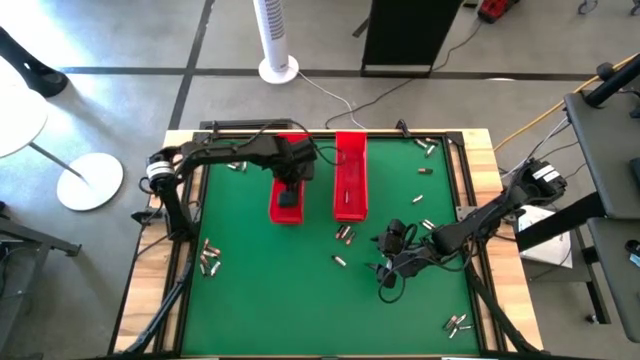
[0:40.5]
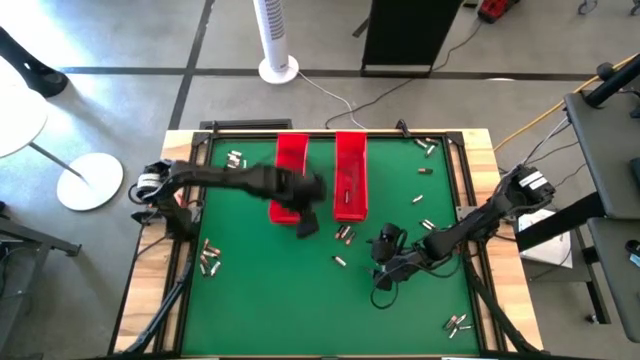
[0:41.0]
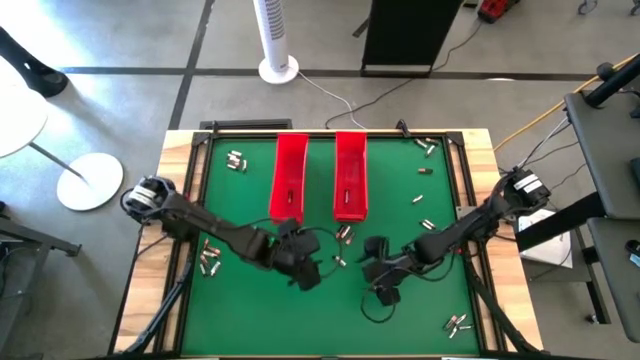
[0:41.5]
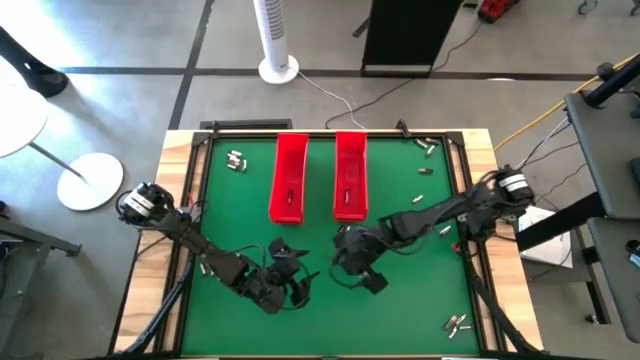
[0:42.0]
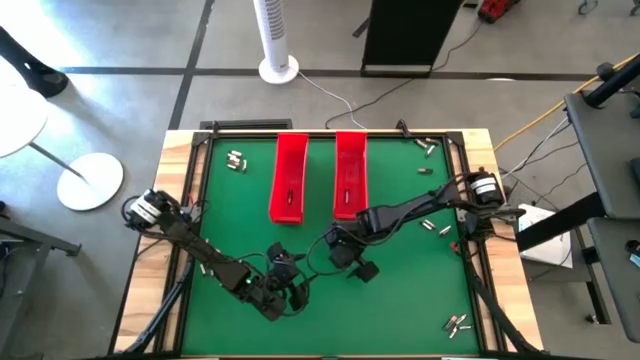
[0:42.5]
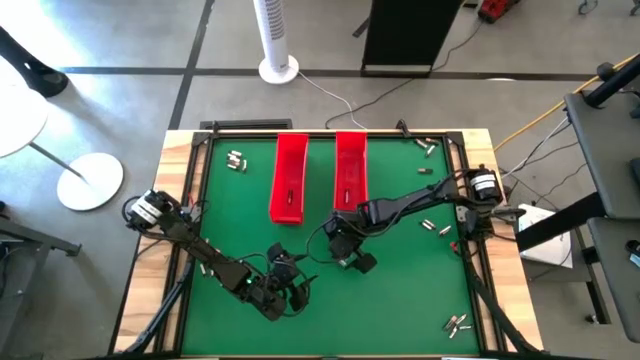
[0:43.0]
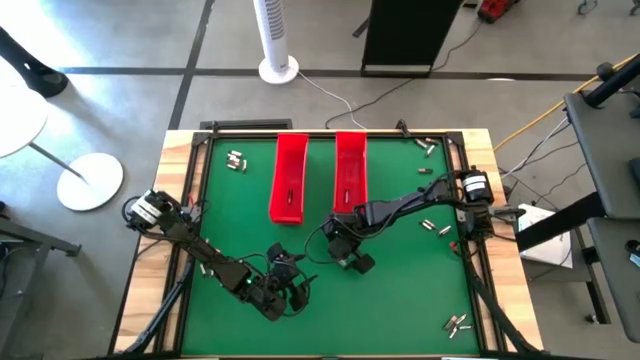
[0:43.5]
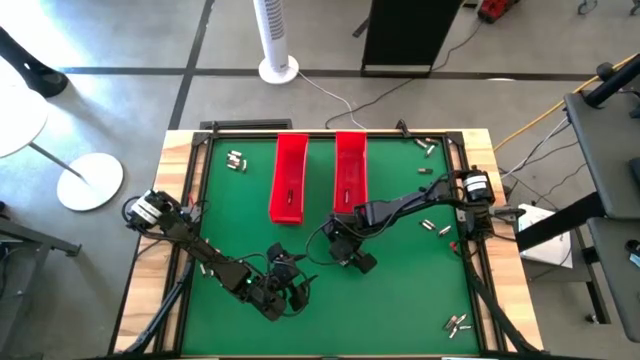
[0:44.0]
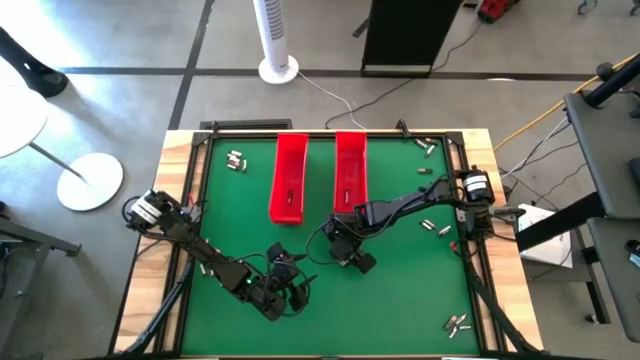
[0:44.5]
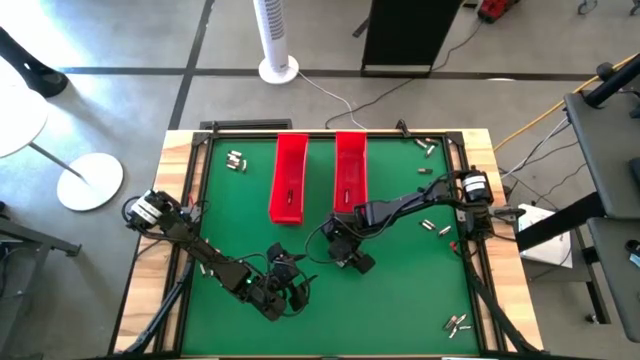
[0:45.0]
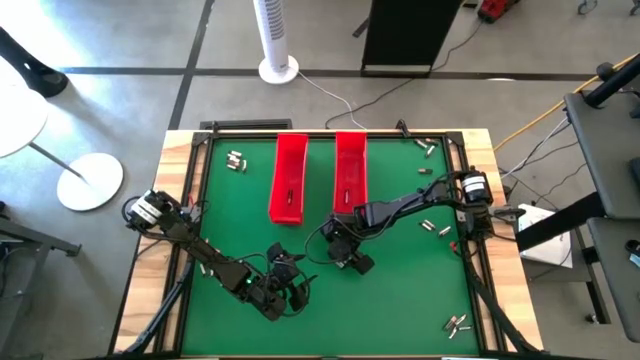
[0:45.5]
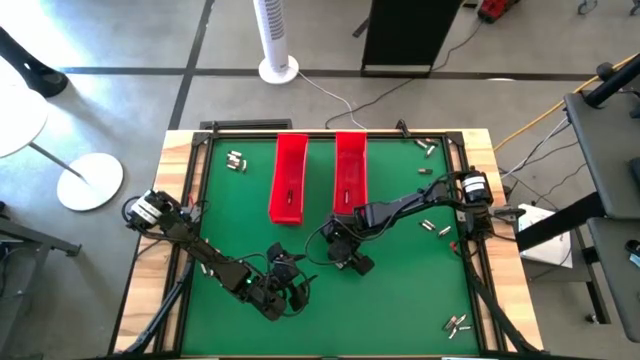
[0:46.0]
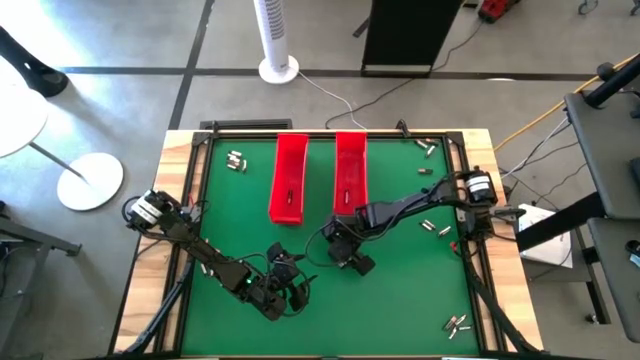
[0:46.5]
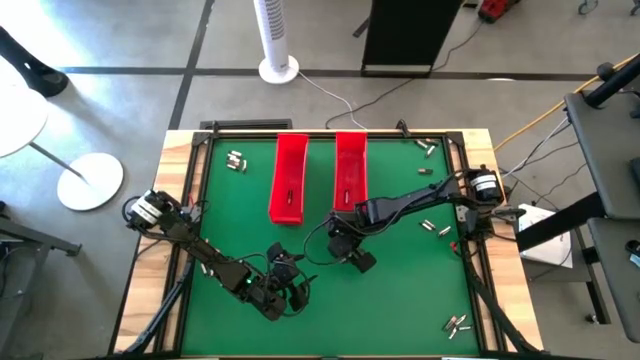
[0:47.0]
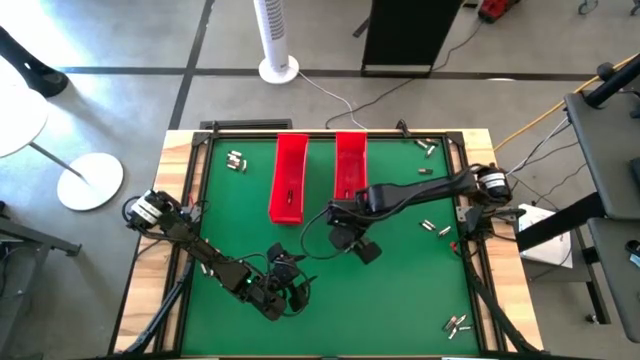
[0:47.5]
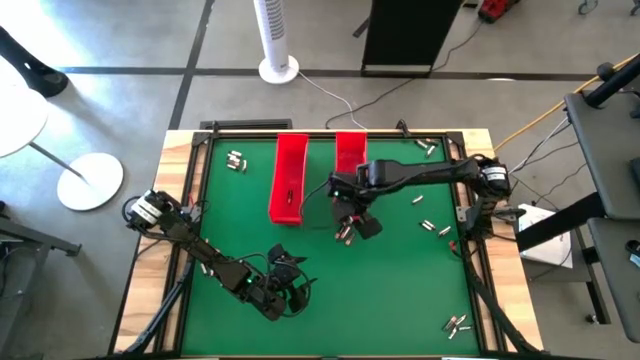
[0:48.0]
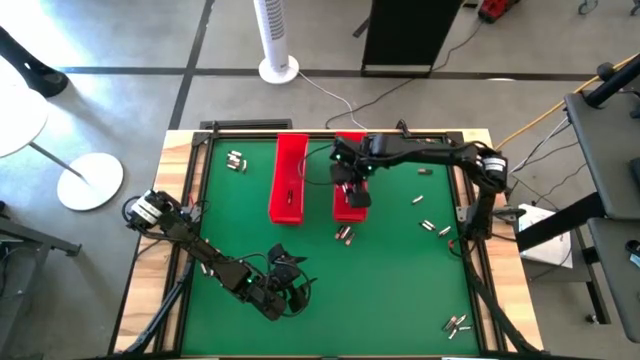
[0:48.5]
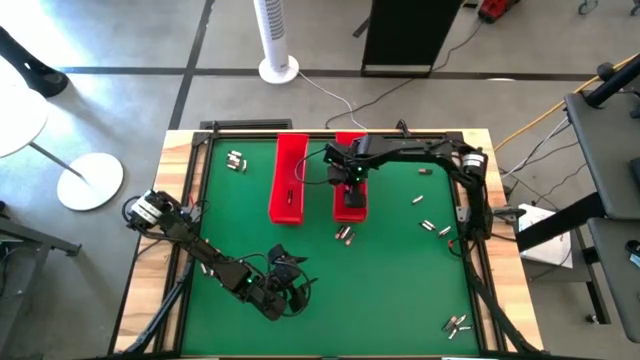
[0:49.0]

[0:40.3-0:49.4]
Task: Sort batteries
Put the silver battery into the right red bin

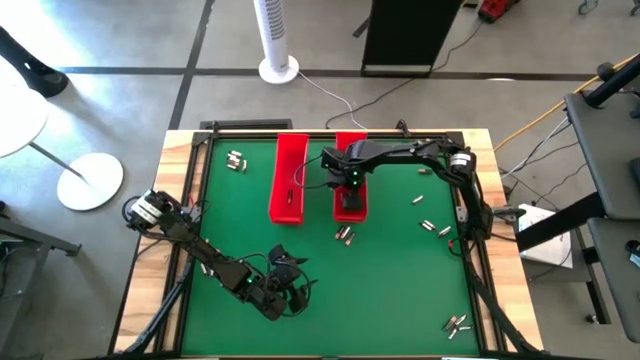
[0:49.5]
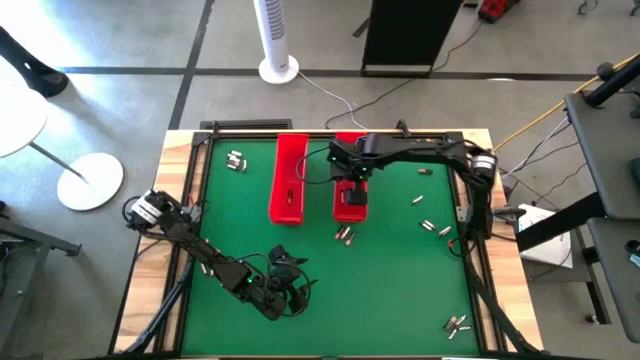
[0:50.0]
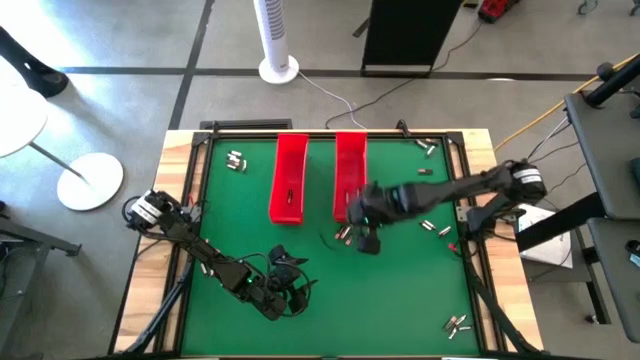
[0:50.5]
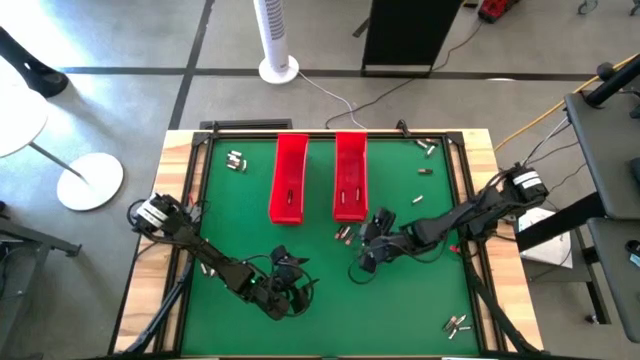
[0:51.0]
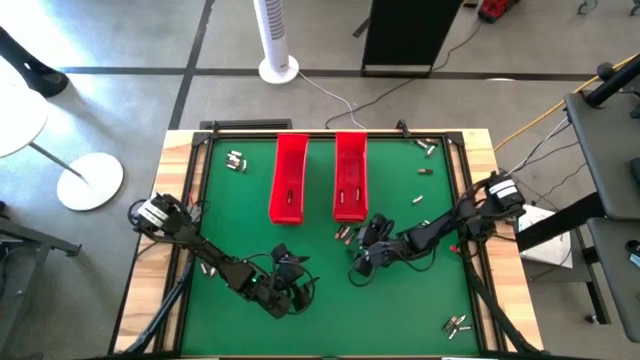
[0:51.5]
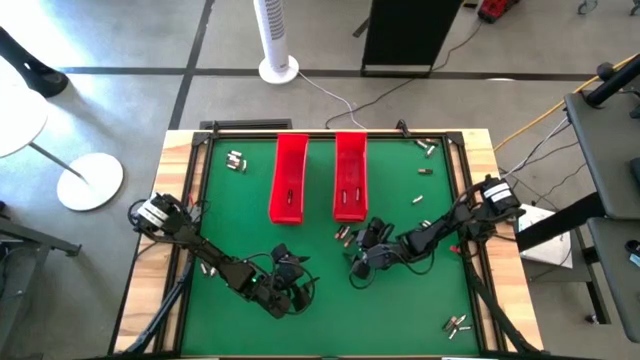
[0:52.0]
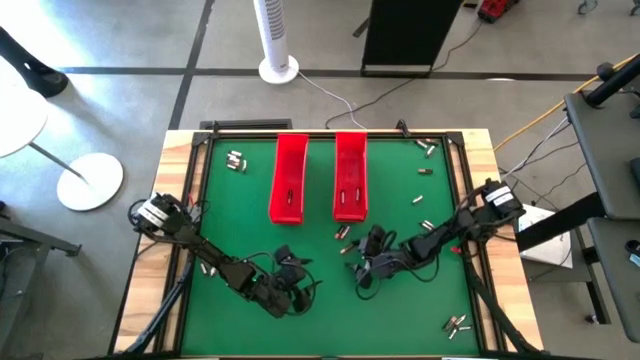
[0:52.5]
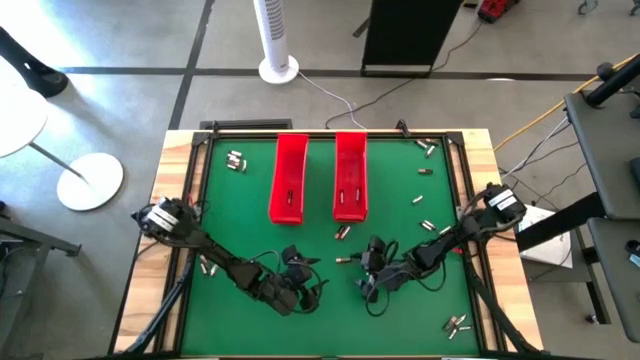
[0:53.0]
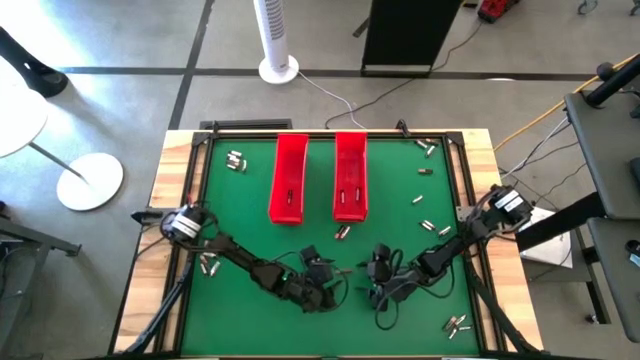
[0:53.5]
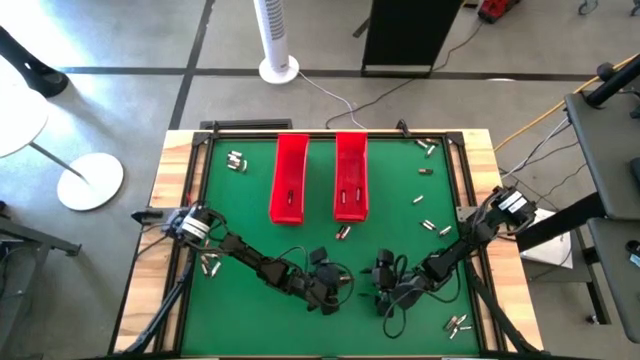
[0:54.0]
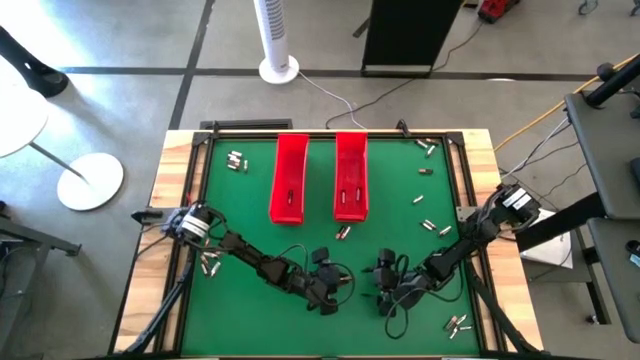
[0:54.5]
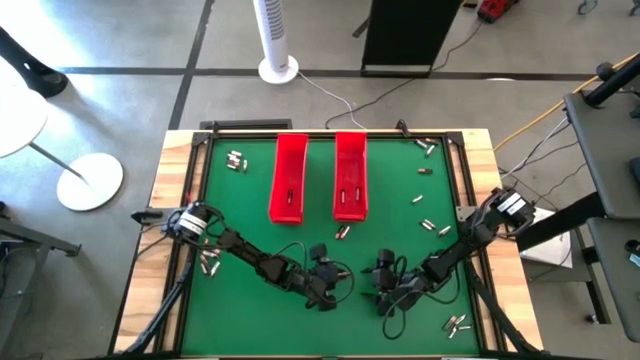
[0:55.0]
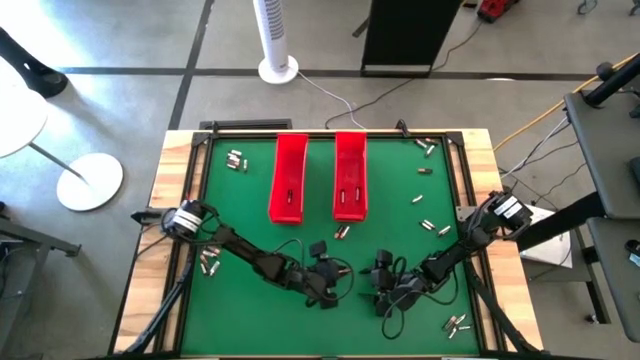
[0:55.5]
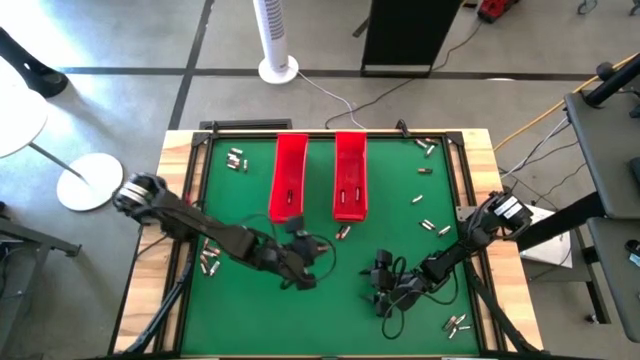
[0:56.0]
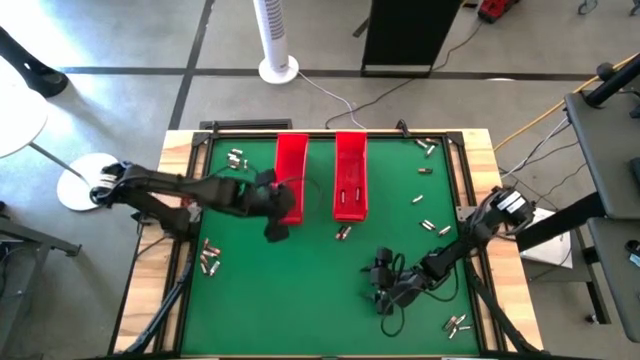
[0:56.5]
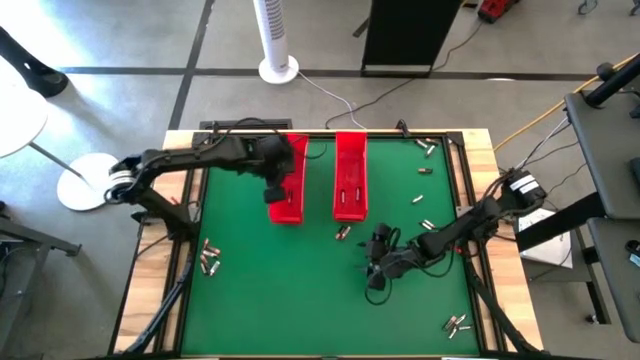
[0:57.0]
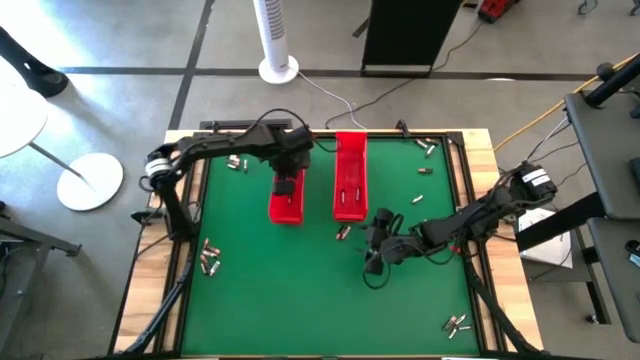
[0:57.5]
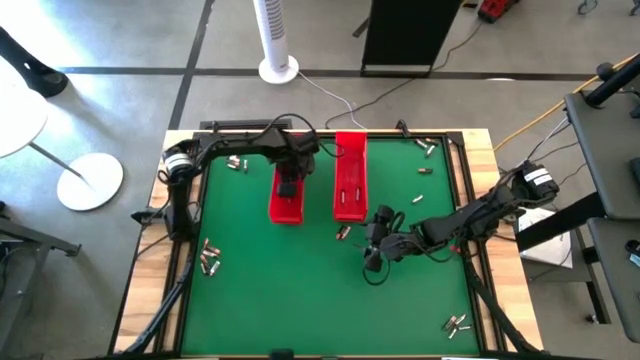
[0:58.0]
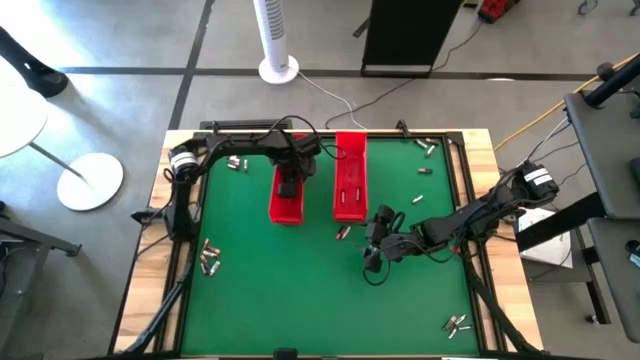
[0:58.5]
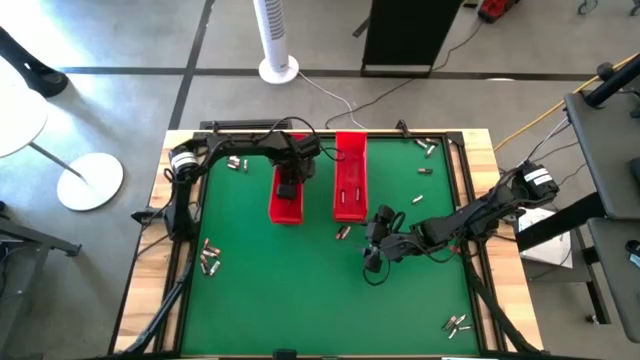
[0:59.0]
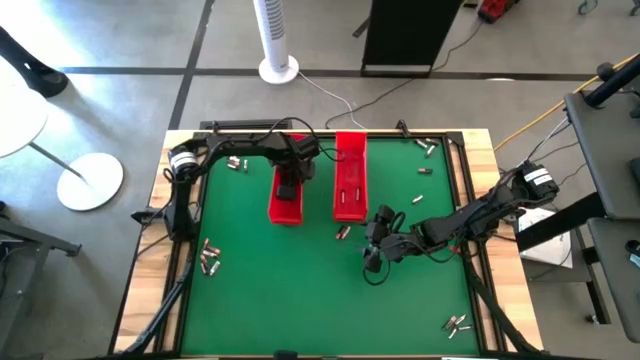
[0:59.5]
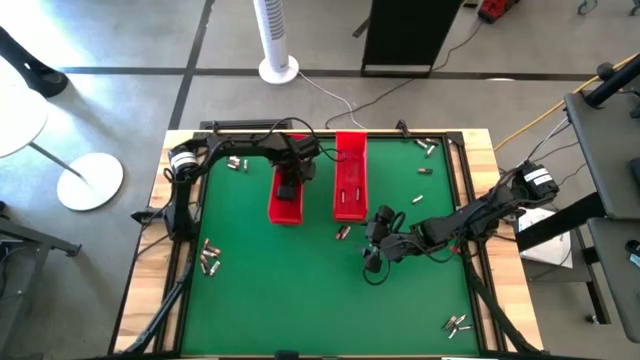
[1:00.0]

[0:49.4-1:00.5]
Put the black battery into the left red bin
